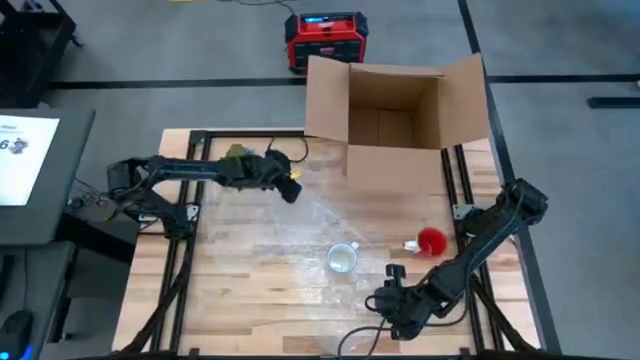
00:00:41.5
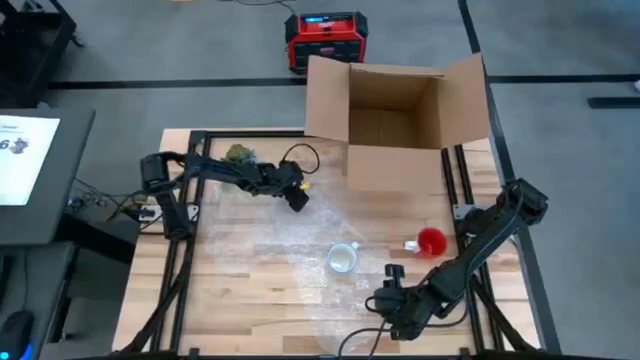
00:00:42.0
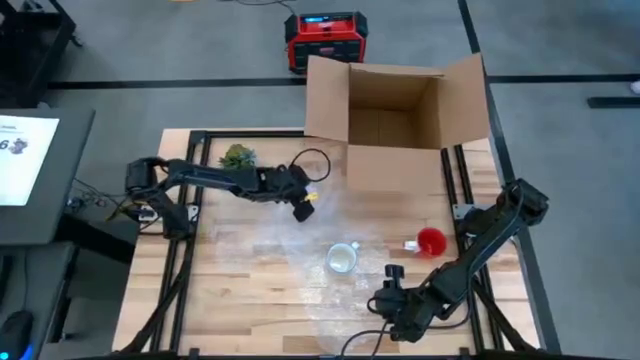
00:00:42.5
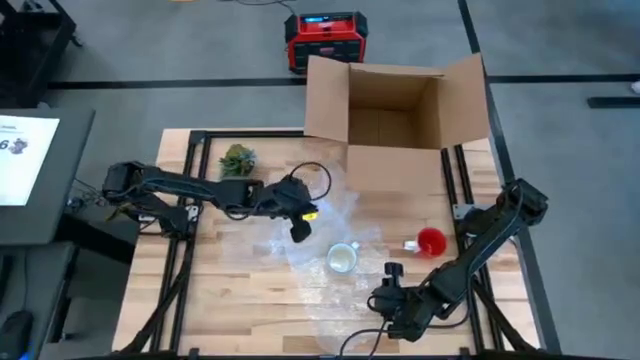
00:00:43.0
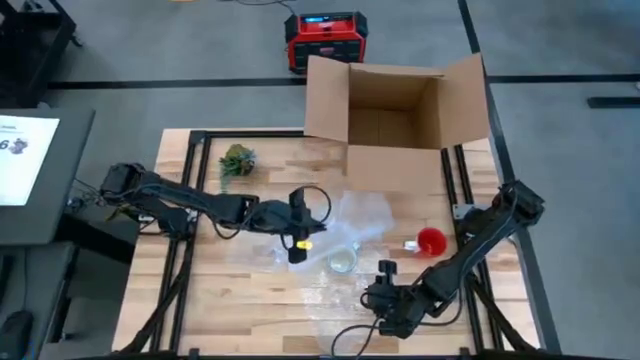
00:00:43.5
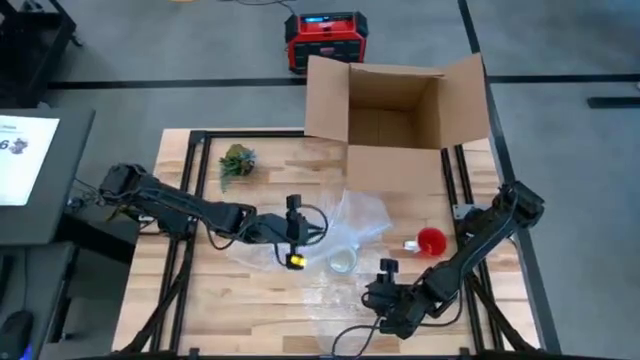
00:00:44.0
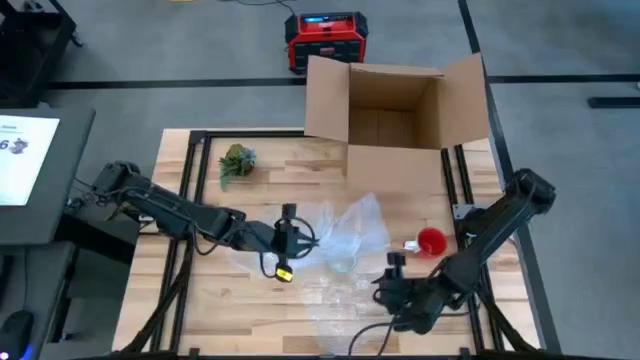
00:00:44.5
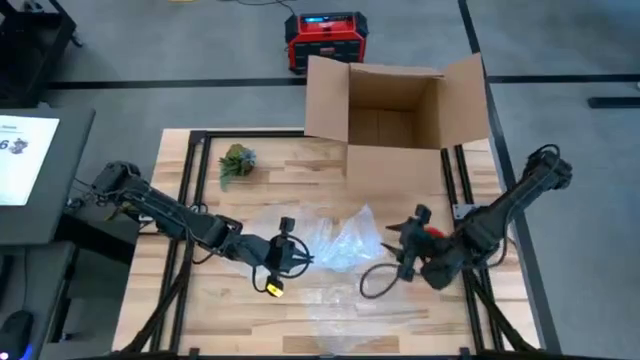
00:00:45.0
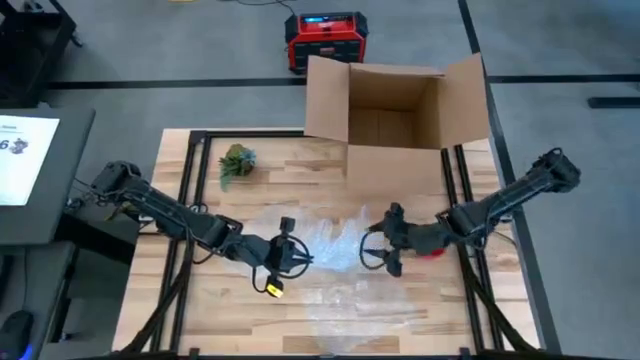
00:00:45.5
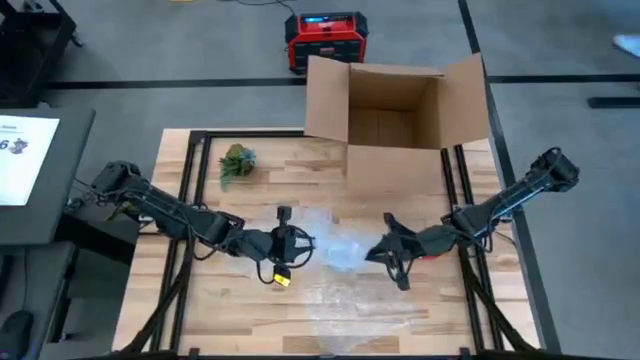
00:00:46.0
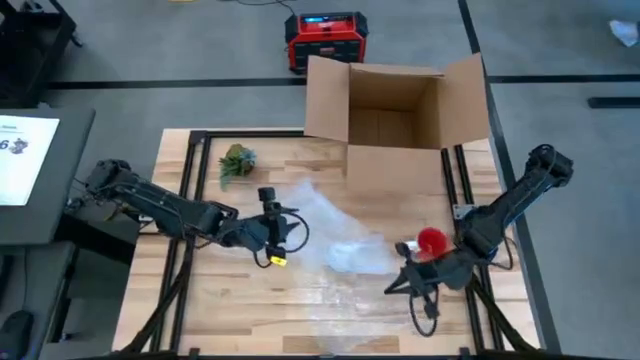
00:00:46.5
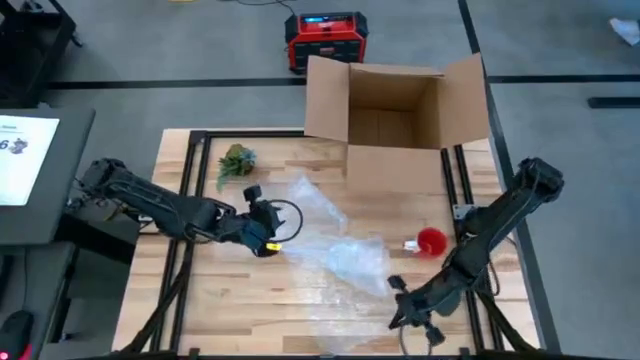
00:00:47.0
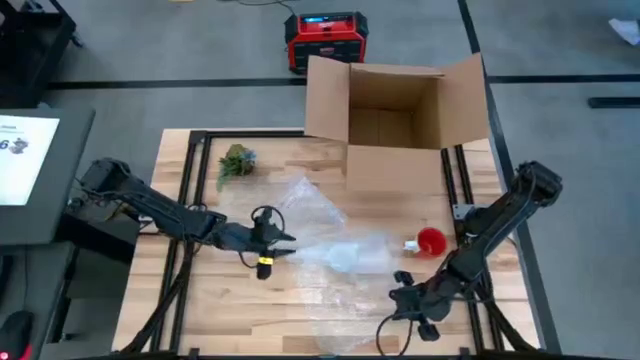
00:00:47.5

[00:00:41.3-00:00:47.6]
Task: wrap mug
Wrap the blue patterned mug with the transparent bubble wrap

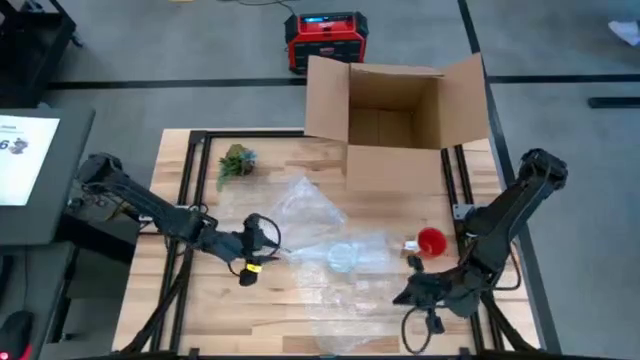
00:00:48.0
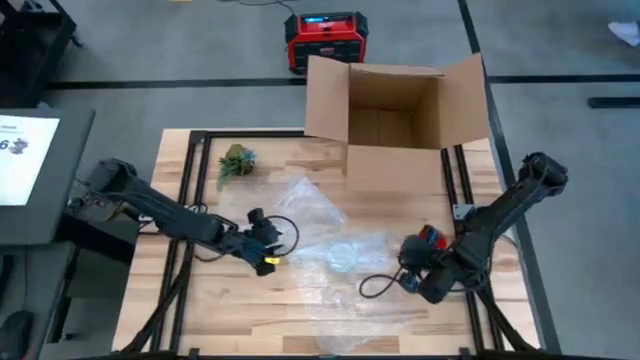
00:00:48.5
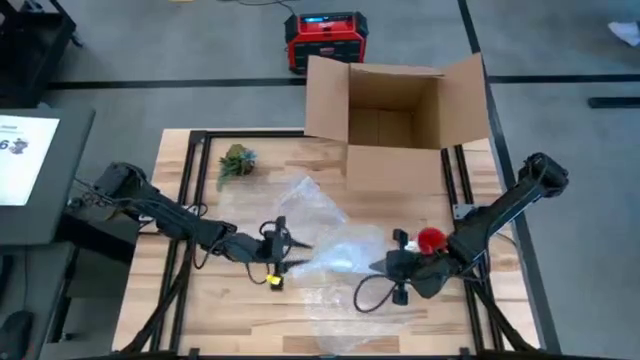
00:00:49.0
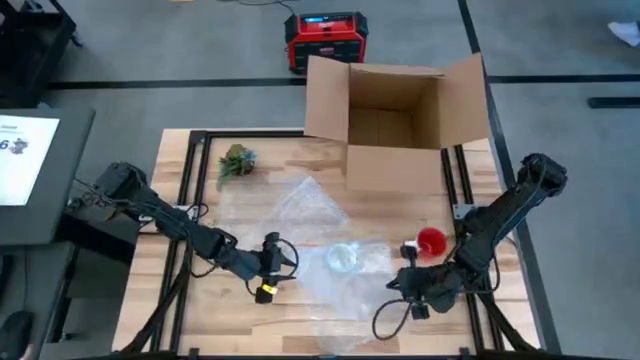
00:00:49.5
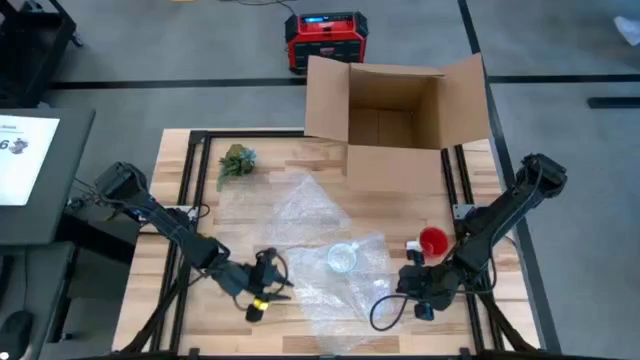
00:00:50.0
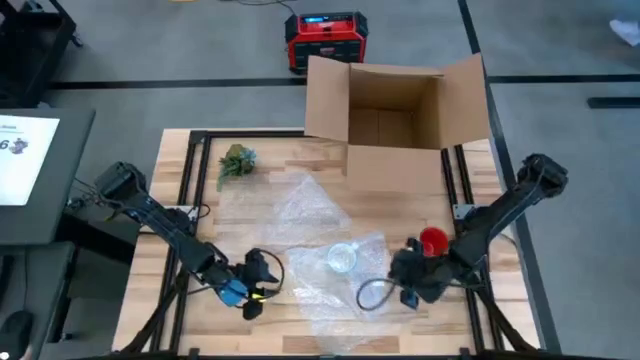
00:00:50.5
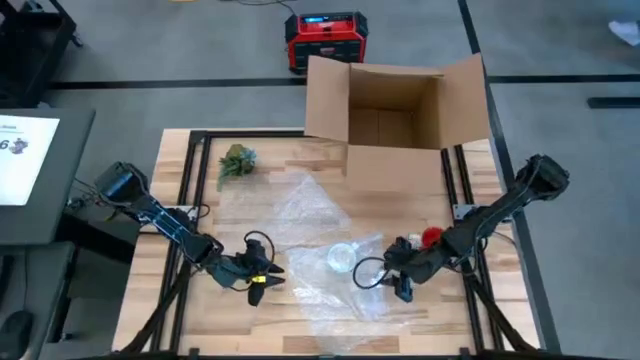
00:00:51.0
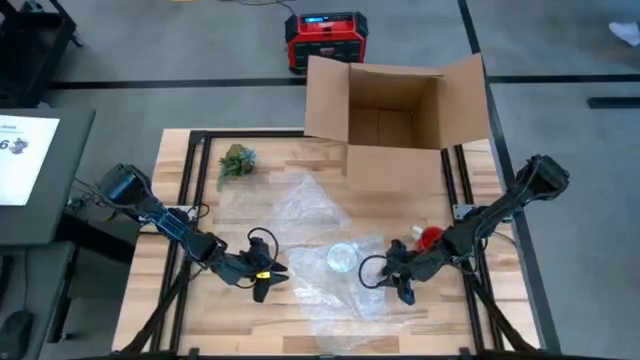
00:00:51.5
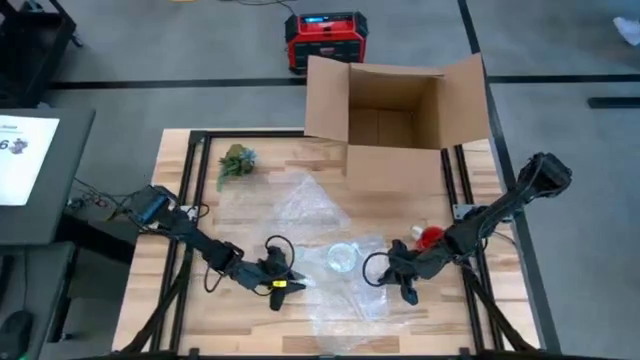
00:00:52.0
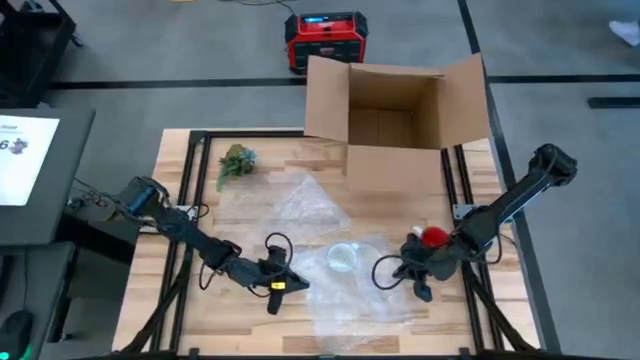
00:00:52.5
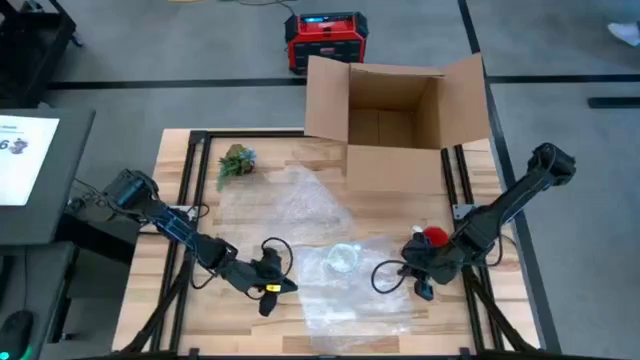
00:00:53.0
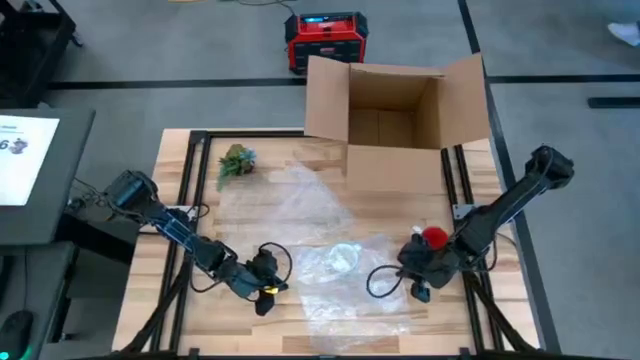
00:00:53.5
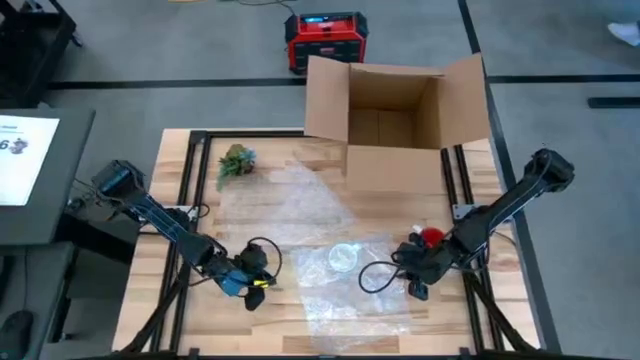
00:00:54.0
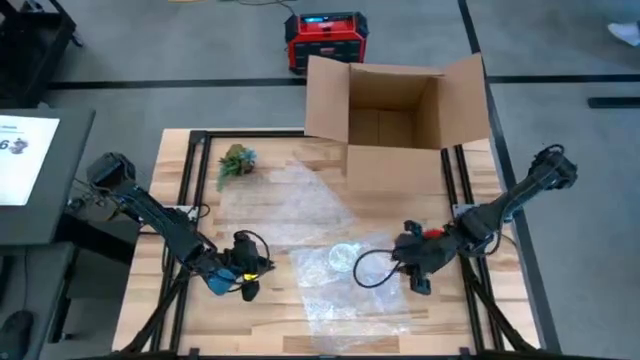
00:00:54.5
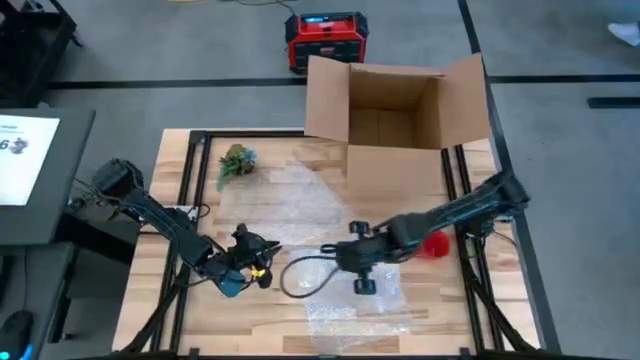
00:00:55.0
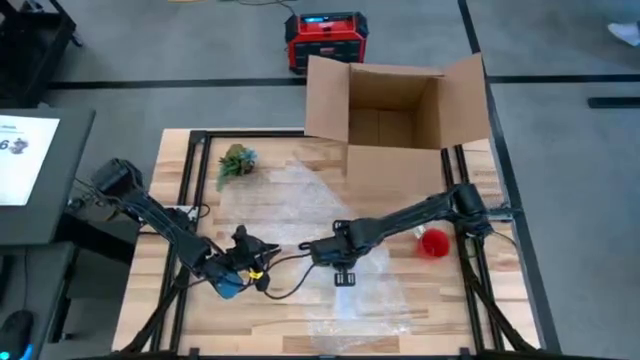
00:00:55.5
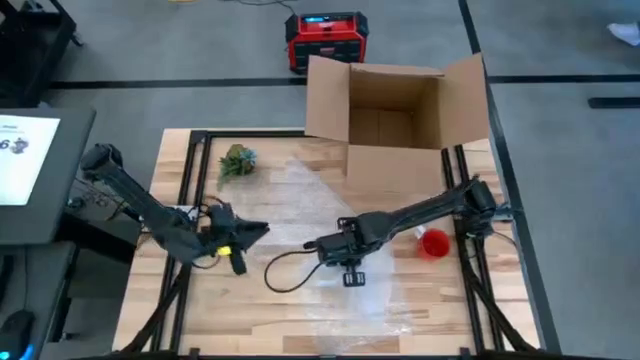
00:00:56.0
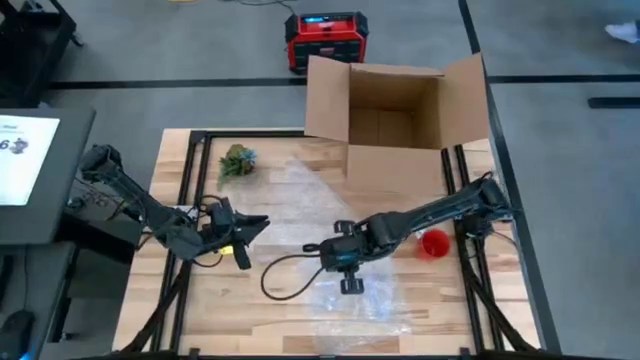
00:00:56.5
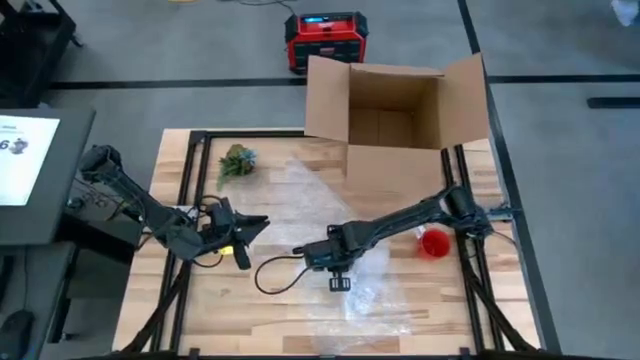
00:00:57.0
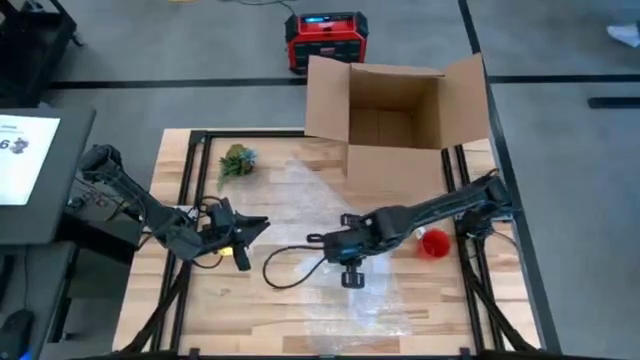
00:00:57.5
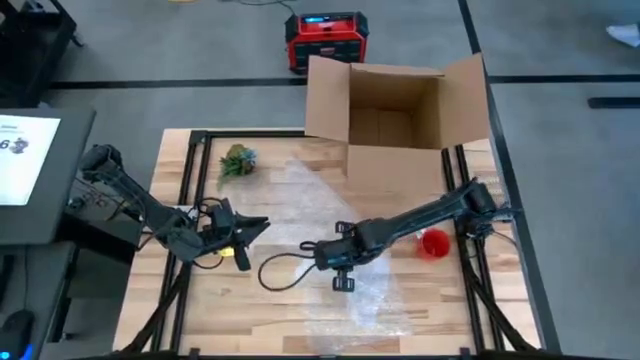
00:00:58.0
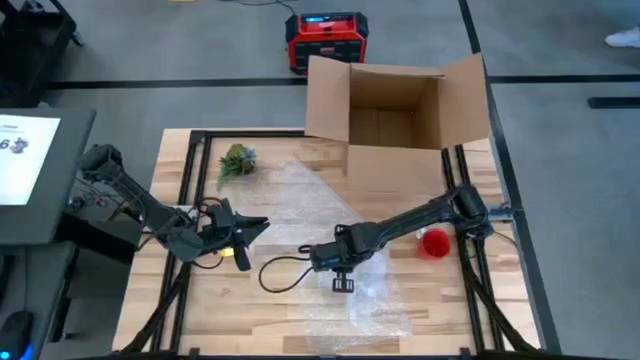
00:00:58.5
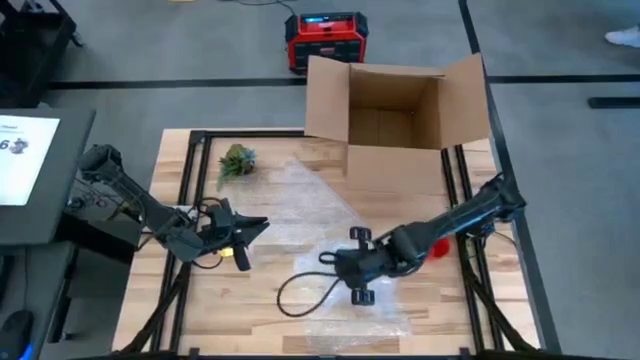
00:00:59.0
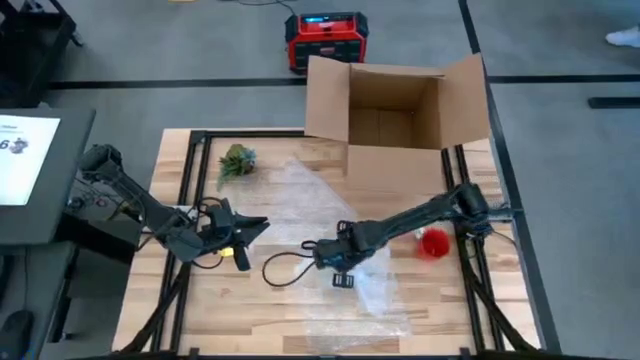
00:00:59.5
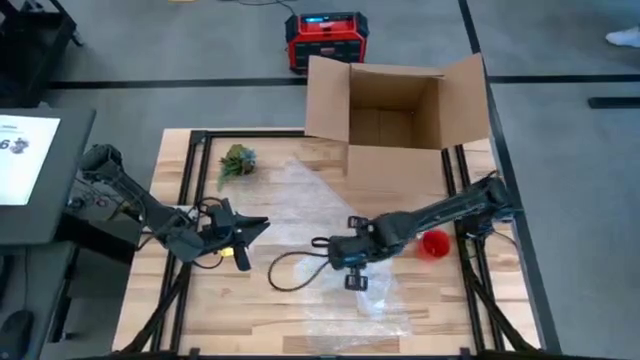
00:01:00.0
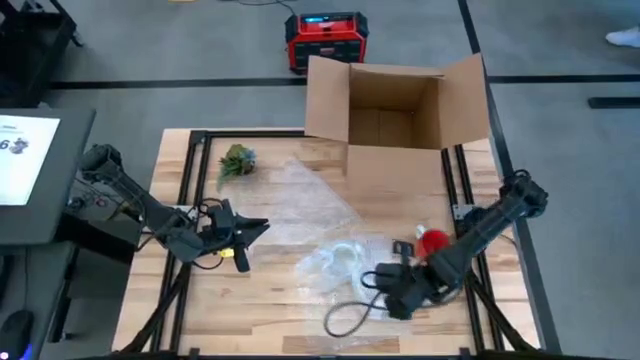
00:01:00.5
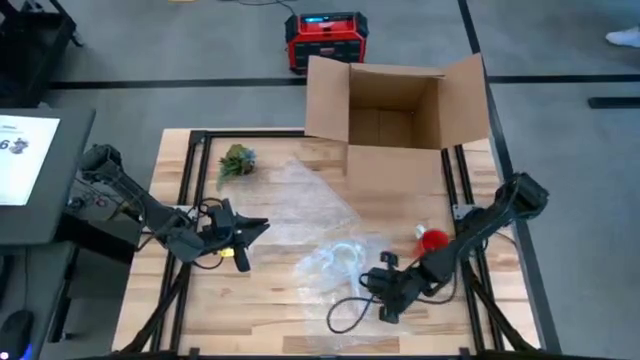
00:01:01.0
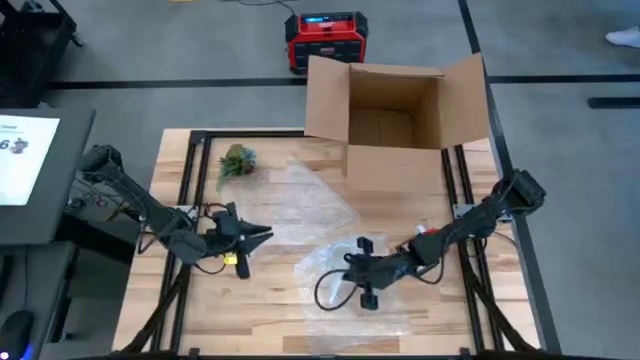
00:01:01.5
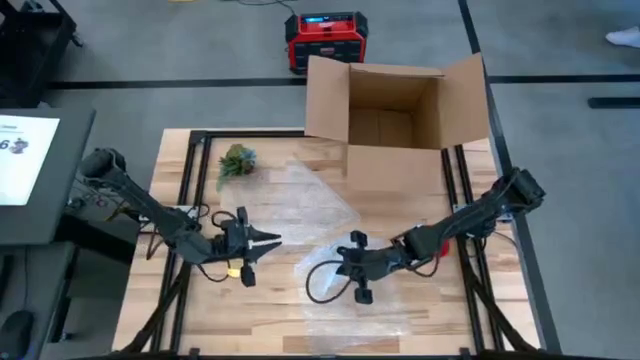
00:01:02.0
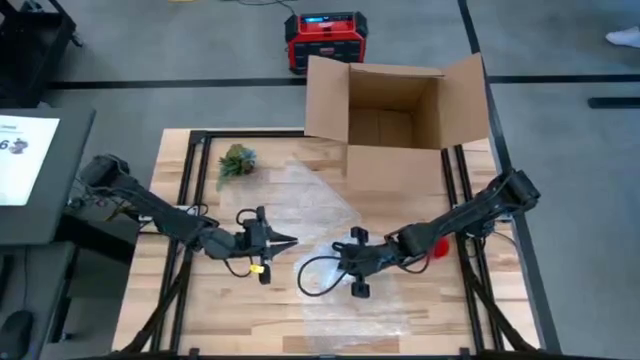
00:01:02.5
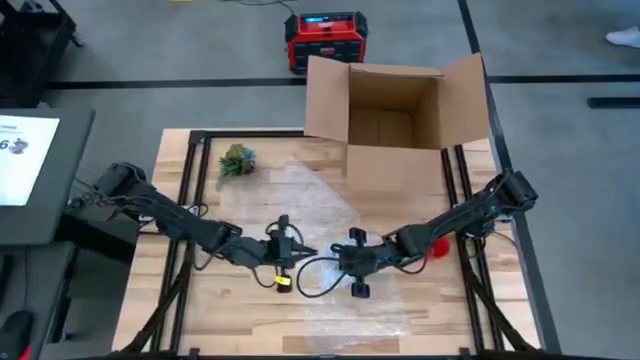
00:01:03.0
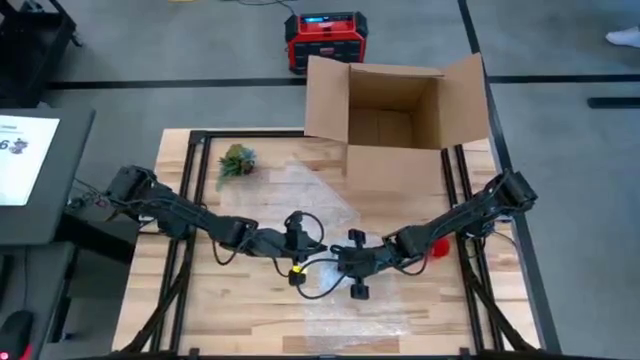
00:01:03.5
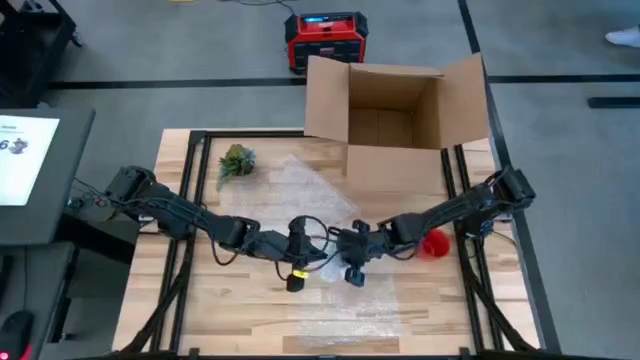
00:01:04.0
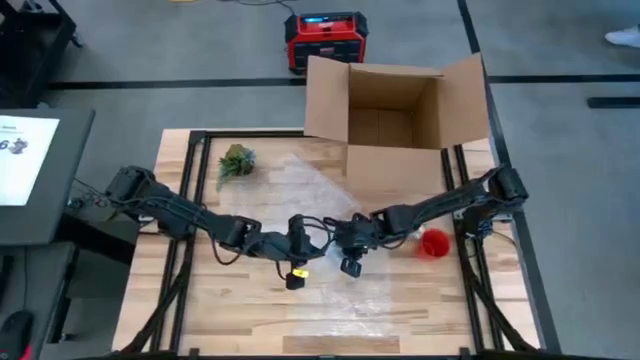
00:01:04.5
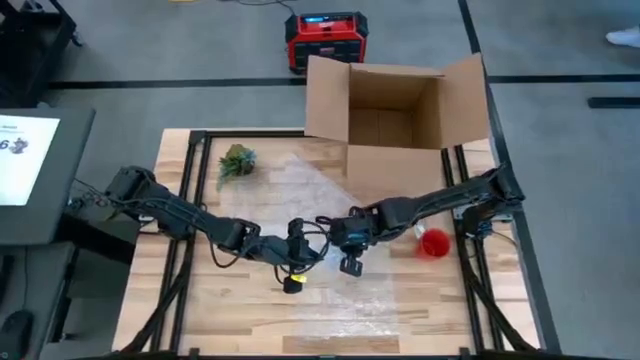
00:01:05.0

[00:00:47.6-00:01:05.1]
Wrap the blue patterned mug with the transparent bubble wrap
